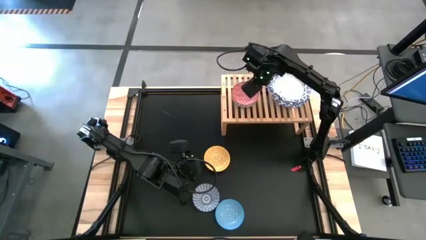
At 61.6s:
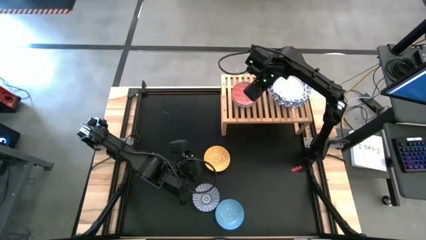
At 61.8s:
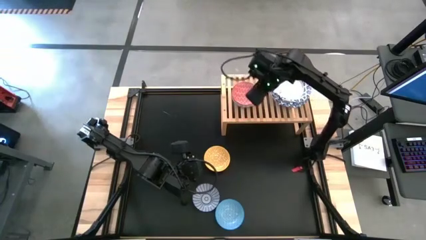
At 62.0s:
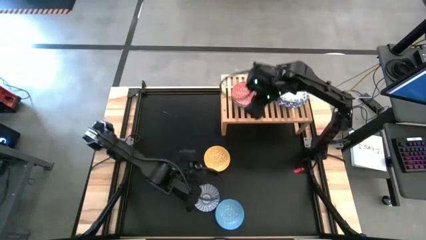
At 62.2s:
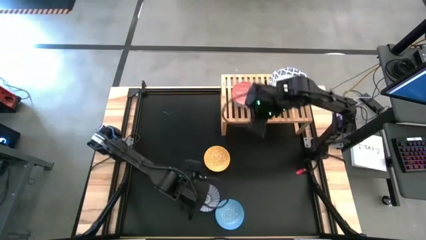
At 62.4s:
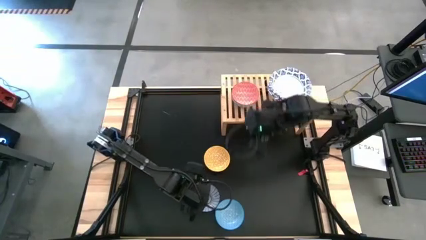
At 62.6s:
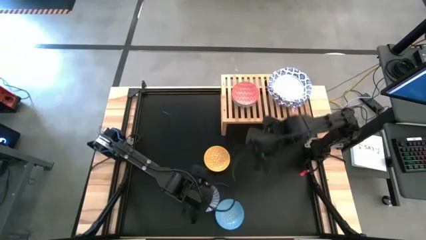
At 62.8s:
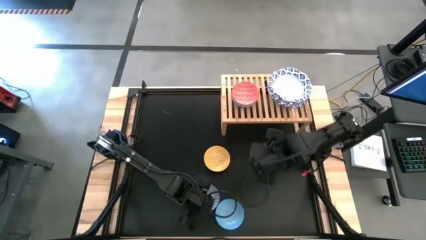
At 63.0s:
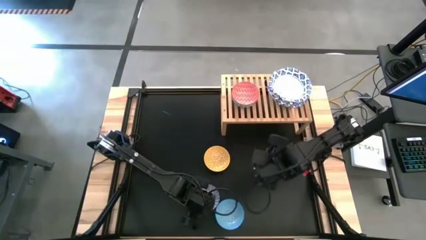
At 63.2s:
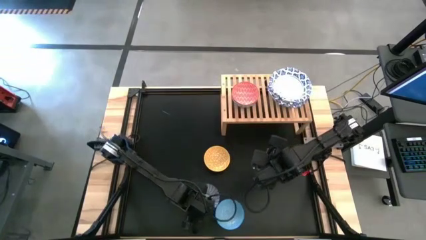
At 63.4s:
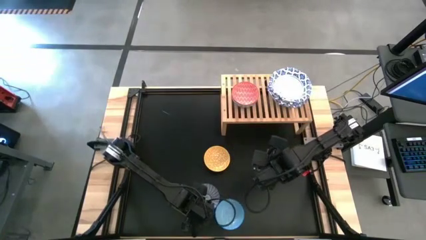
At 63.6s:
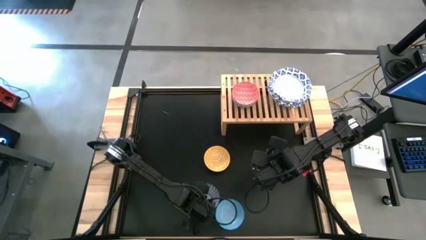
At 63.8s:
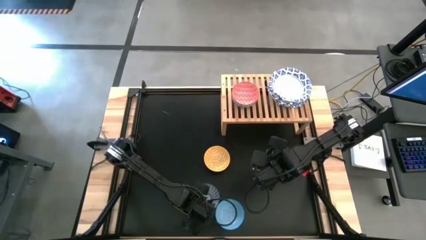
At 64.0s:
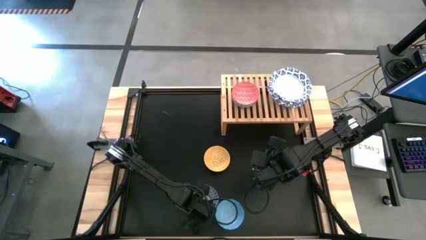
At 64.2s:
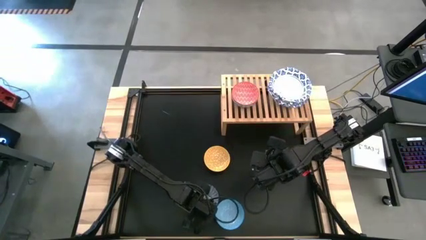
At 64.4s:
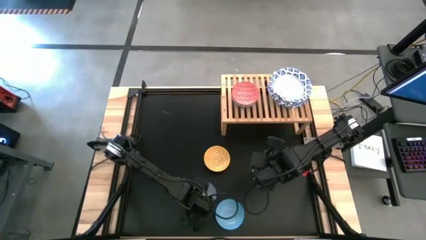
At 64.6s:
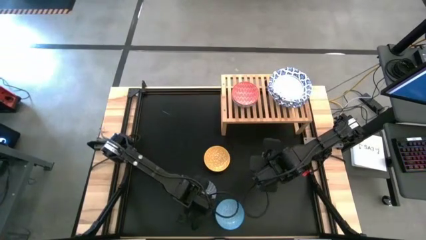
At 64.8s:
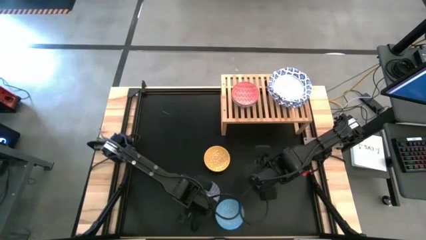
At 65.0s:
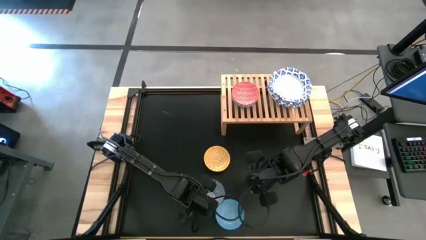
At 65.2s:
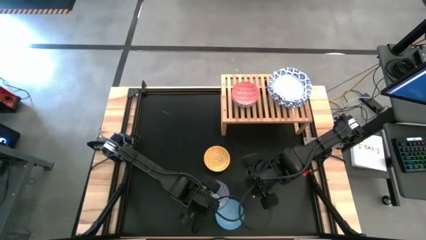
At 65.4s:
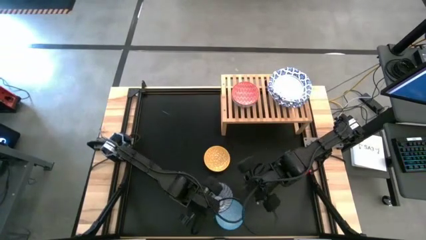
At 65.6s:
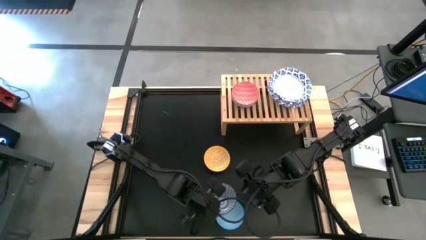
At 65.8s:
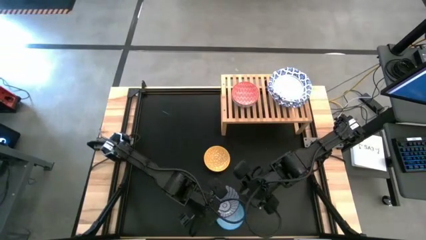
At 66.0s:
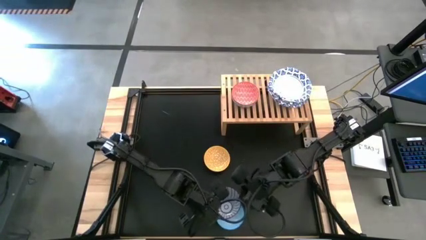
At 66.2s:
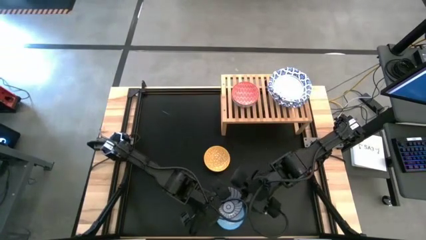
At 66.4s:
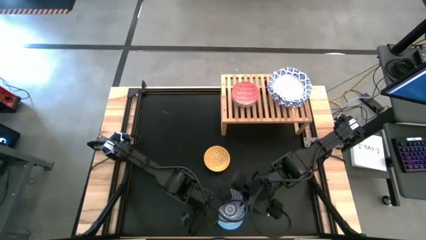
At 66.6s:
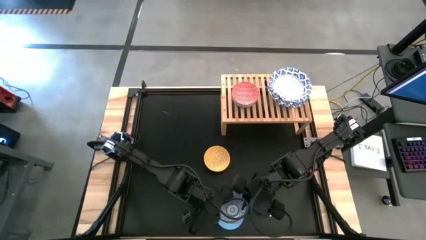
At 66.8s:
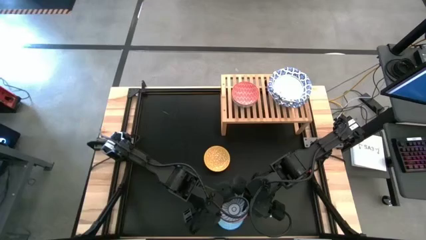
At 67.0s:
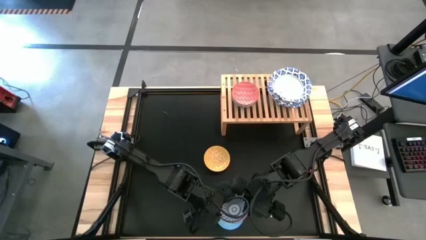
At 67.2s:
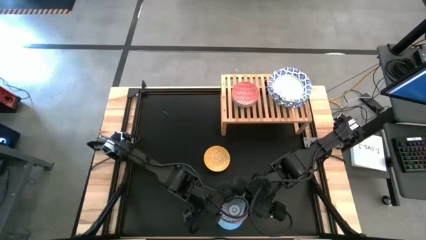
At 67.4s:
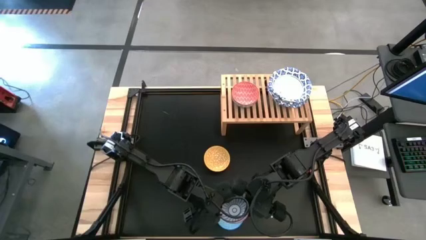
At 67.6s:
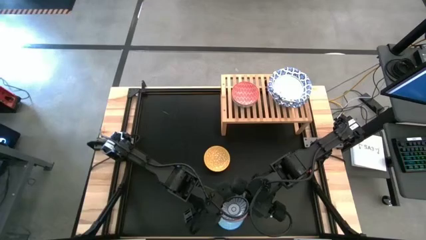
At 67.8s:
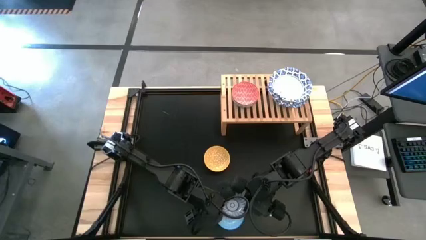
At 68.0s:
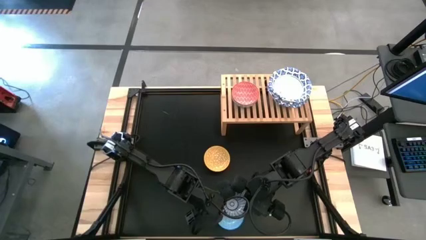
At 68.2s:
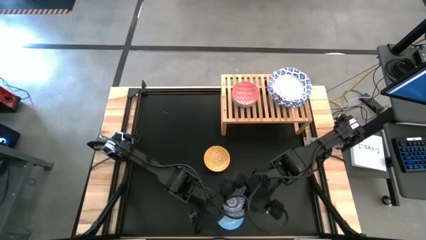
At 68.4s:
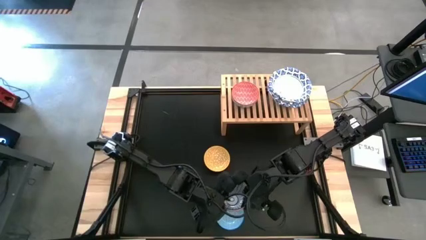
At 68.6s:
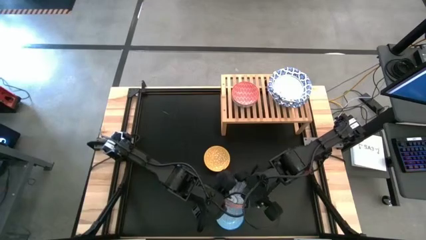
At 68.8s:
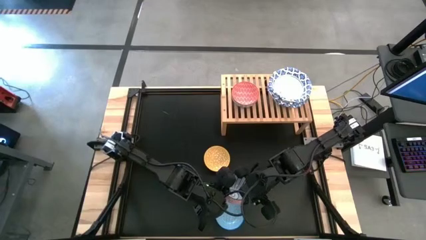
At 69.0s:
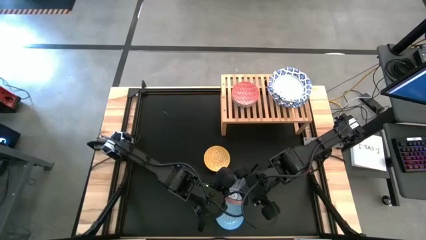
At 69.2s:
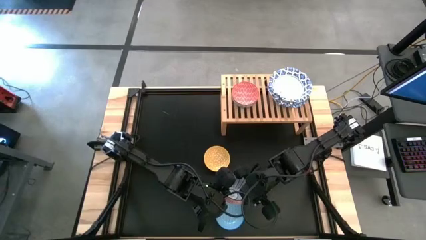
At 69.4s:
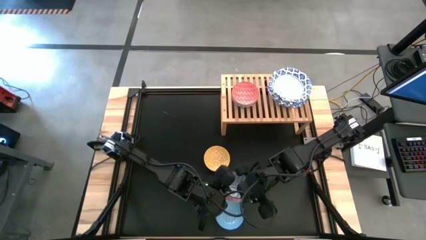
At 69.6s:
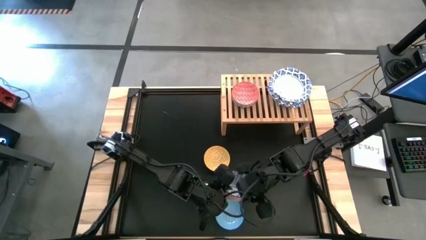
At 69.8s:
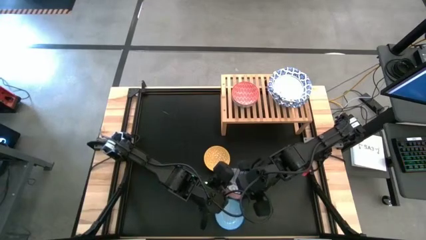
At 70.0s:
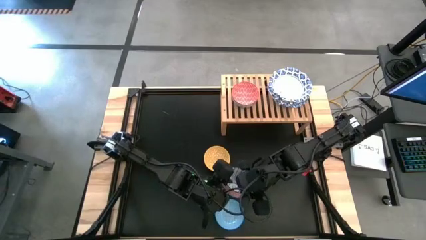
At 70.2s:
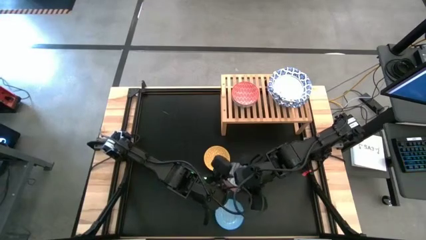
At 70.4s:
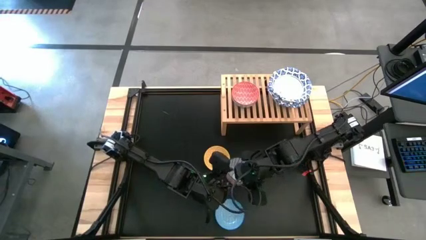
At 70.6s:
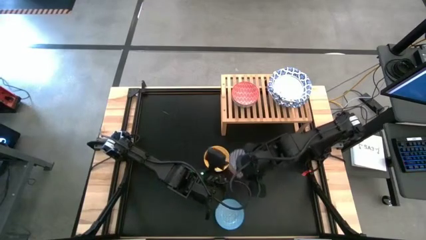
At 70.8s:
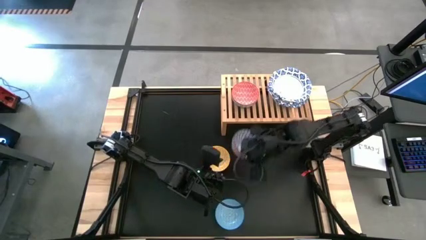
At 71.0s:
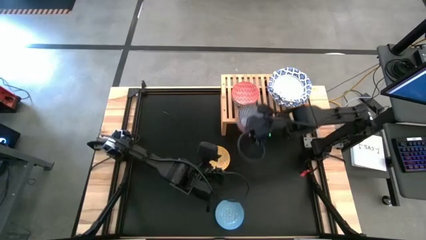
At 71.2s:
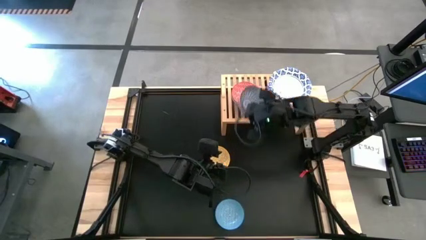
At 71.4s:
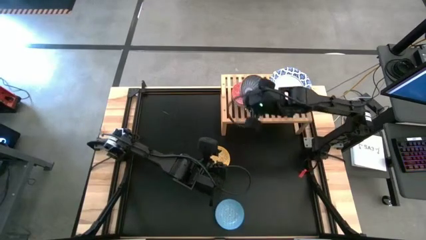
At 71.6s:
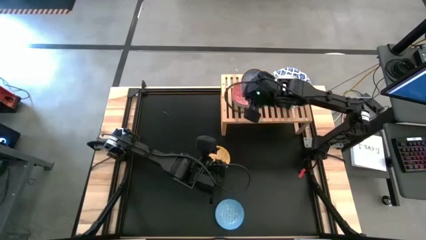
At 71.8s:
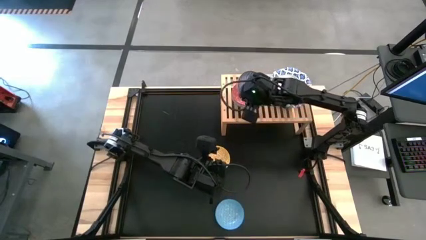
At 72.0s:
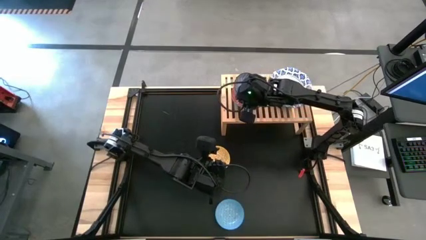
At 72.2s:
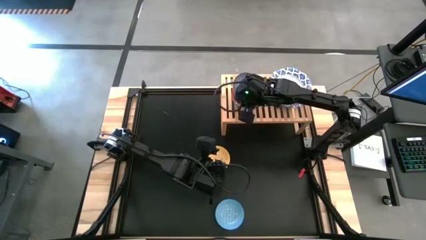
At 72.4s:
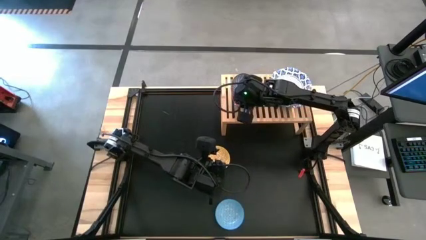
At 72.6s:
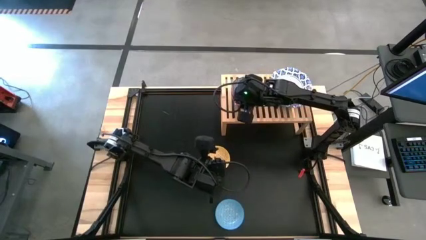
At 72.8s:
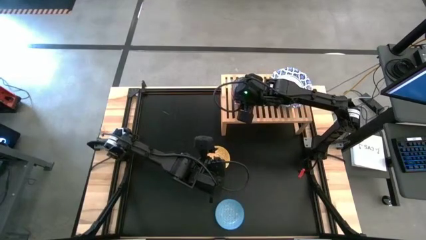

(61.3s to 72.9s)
Task: Place and stack bowls onto a shelf
Stack the blue patterned bowl on top of the red patterned bowl on the shelf
